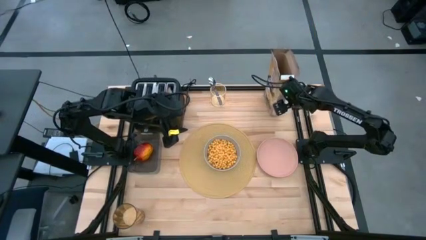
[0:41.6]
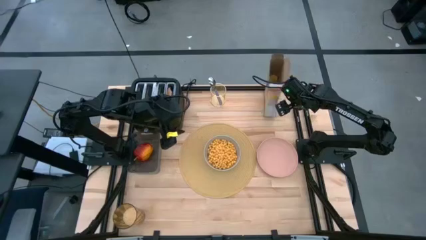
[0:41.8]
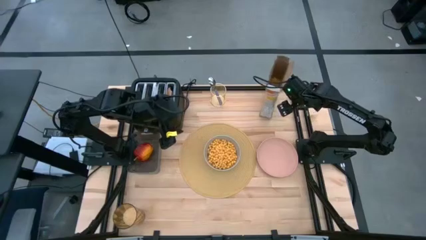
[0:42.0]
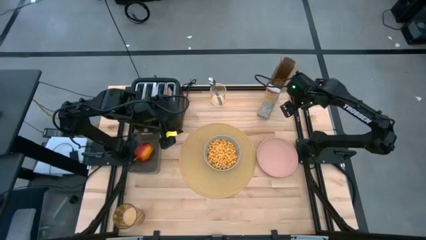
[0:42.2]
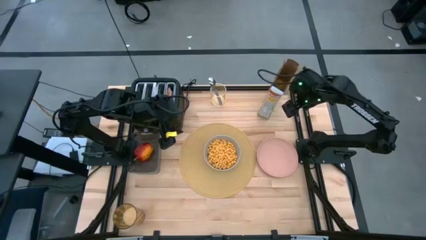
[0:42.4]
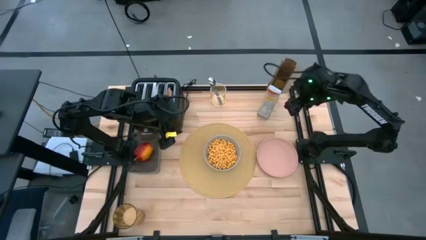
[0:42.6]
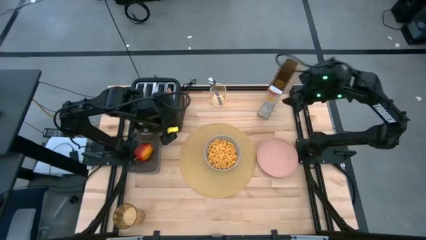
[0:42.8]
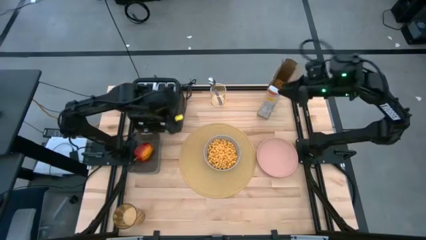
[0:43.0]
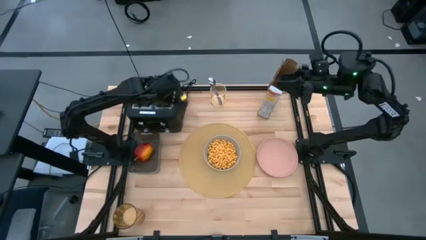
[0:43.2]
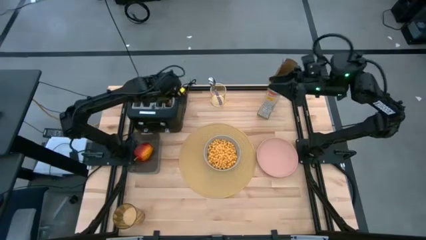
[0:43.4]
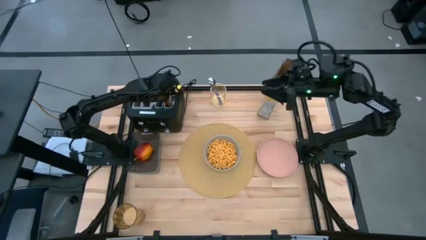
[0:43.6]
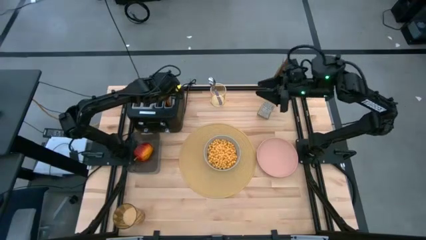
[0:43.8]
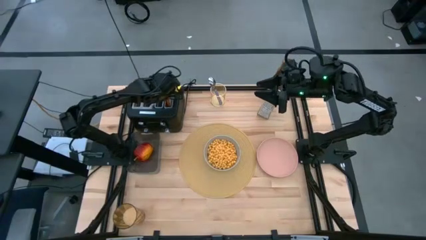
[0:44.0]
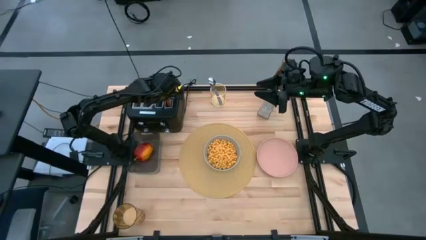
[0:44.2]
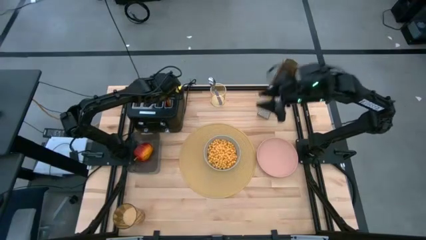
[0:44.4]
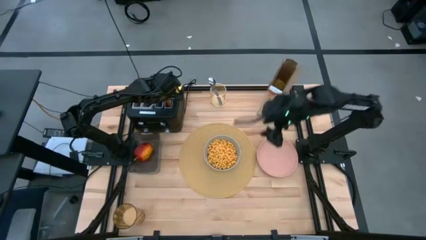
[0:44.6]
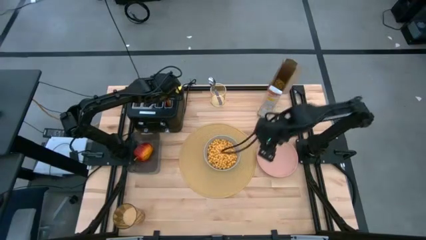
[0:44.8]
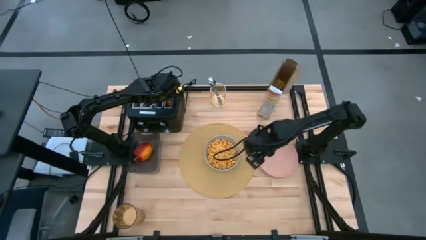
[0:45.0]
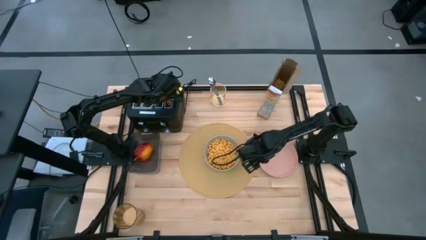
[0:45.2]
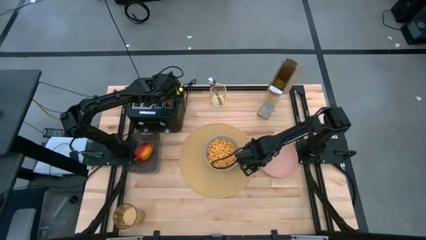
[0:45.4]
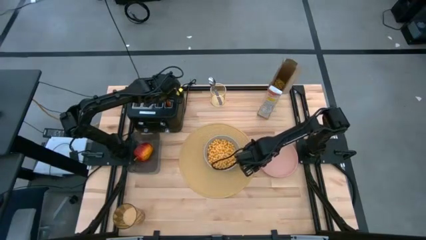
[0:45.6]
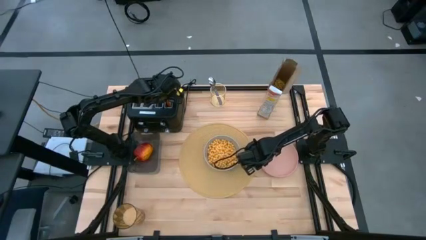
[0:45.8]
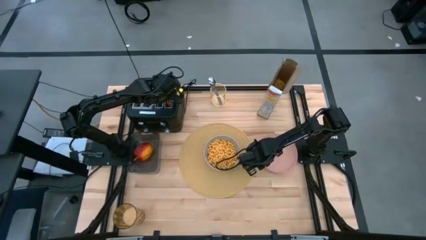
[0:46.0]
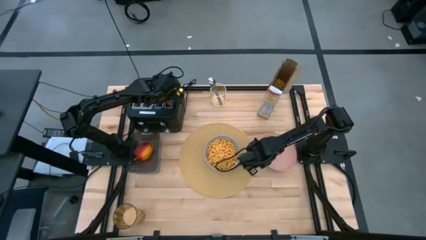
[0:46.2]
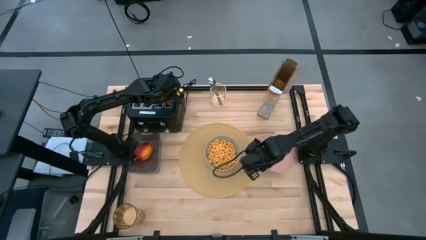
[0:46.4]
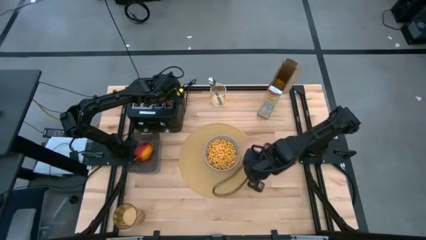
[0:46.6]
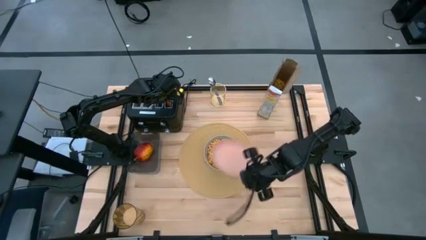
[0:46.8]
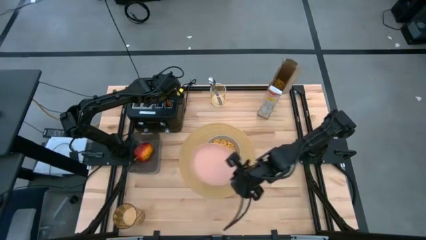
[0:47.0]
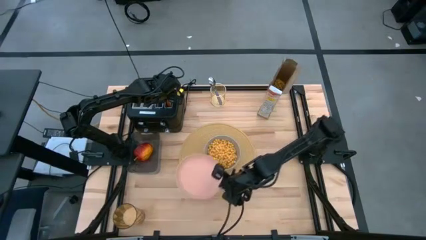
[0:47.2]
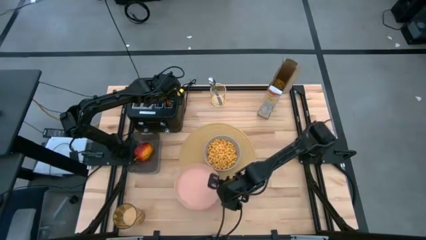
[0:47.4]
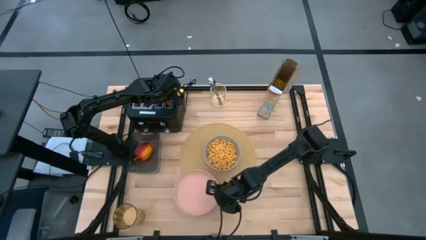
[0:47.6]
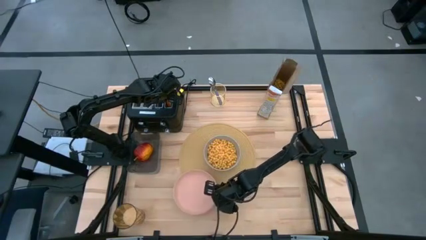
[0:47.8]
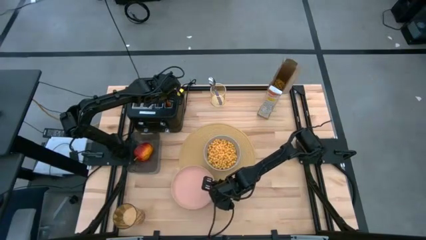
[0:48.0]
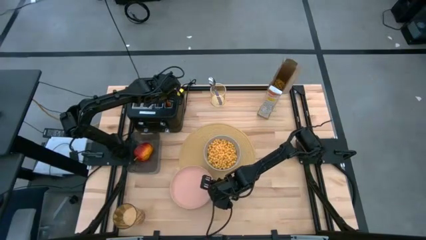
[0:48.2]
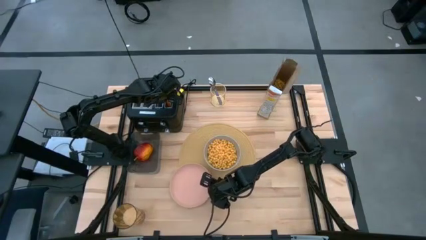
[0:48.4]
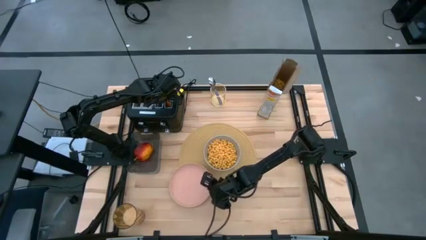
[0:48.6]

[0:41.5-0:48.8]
Task: Arrange a breakfast setting
Put the pink plate on the table mat to the bottom left of the gray bowl

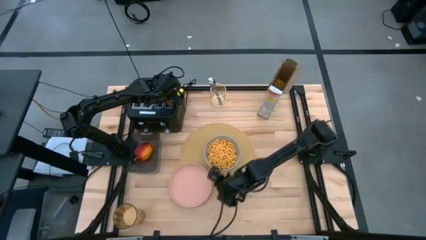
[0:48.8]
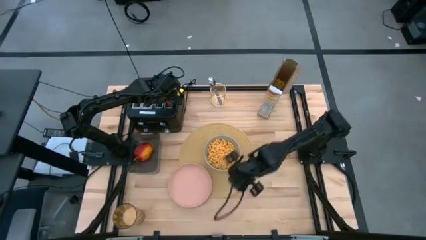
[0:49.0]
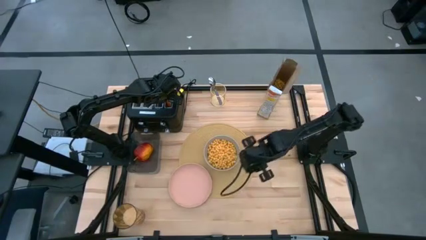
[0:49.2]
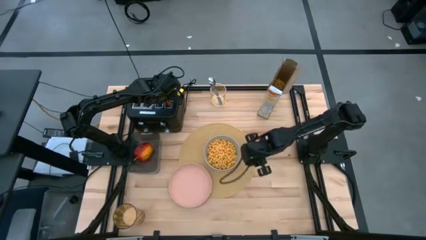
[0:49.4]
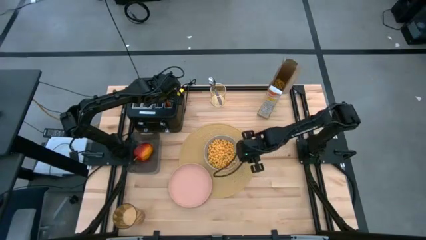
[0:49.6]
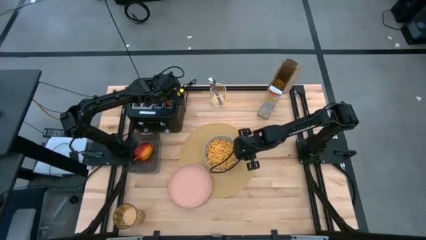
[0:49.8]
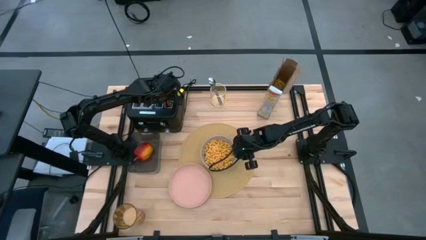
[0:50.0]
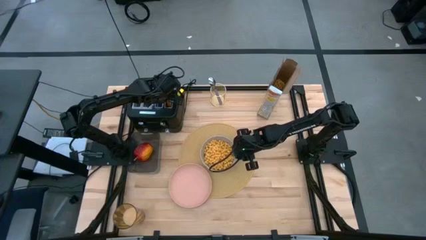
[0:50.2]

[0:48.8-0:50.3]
Adjust the gray bowl

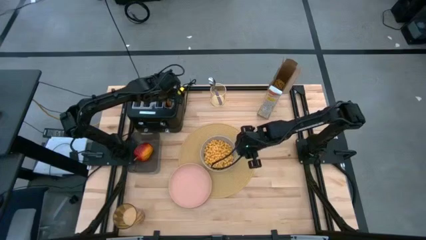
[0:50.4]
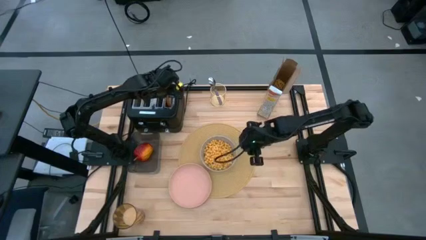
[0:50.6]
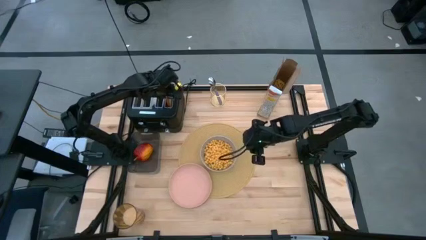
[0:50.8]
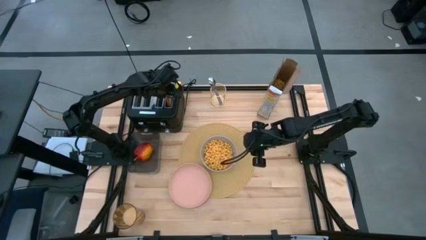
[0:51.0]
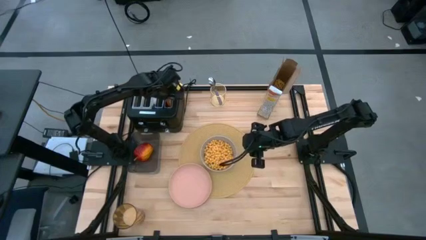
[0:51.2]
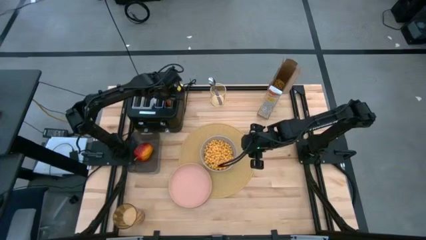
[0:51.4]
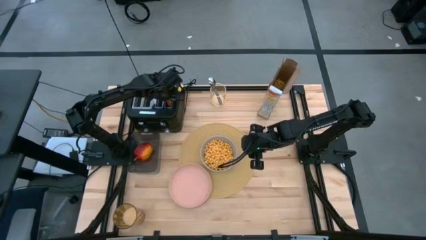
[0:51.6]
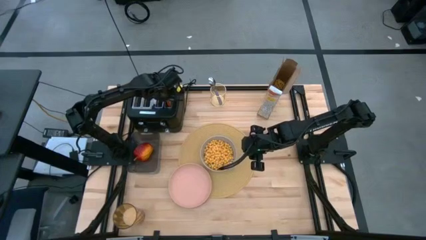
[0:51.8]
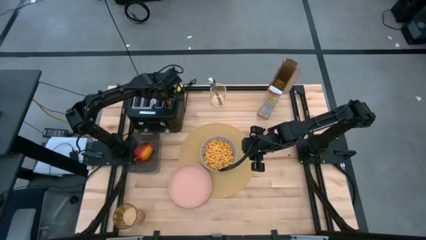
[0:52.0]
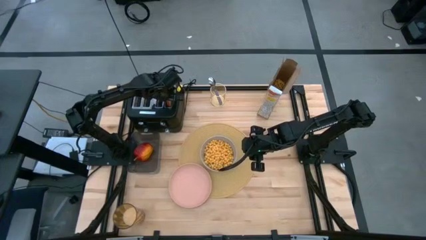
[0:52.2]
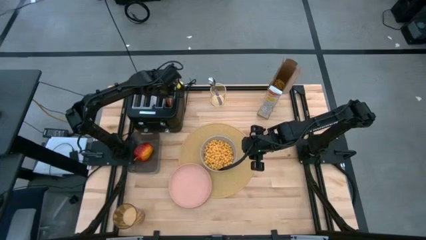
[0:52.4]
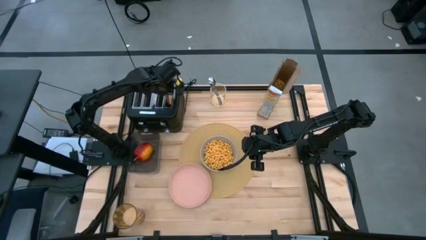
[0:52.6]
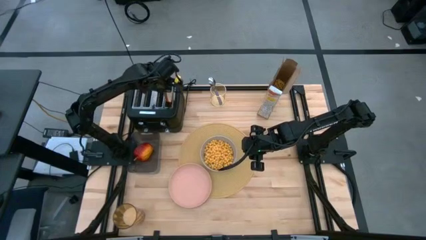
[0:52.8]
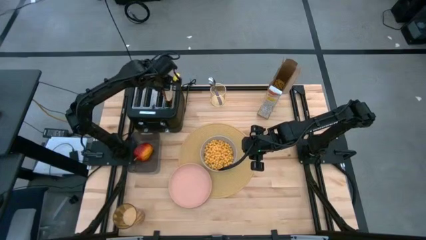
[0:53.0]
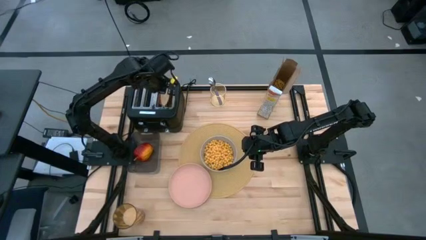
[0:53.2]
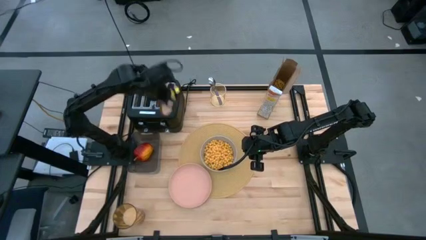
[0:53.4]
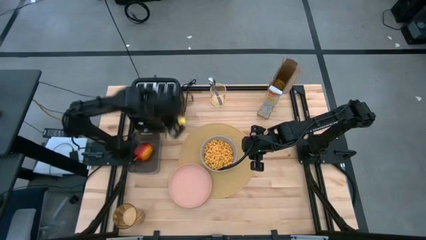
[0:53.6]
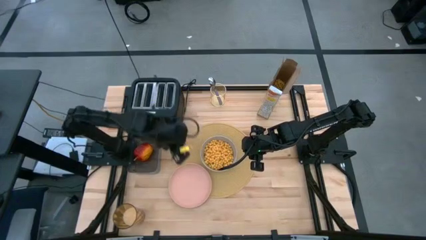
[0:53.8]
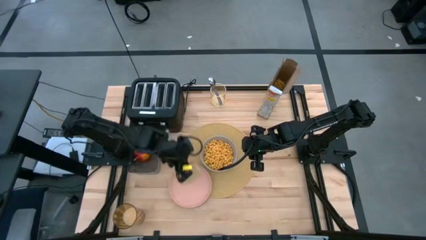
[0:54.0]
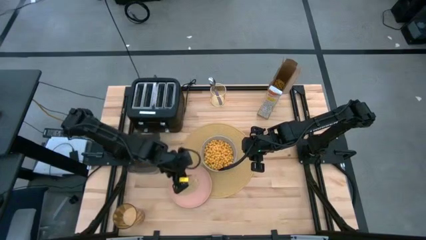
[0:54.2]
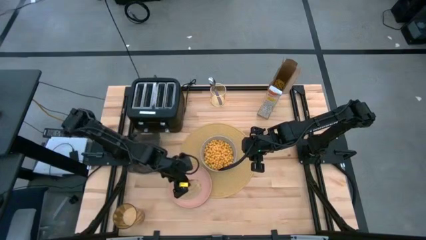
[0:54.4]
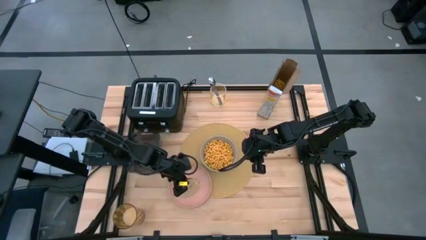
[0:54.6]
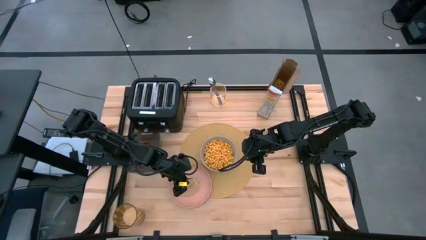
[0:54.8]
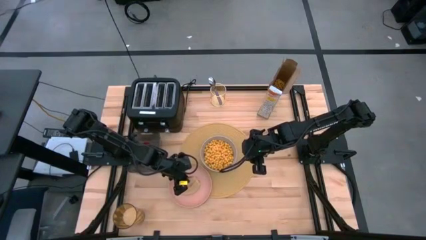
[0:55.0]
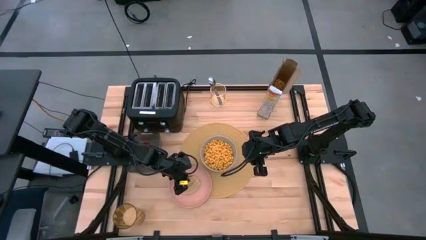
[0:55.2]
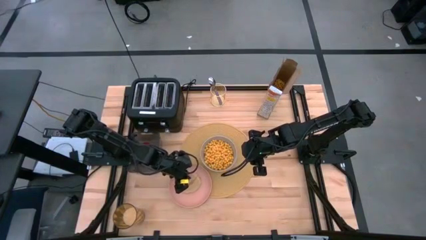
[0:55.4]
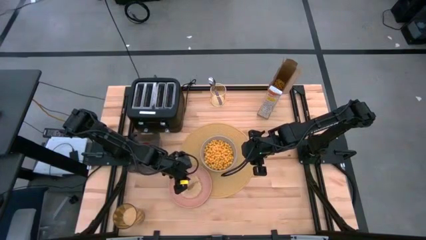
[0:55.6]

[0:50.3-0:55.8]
Put the bagel on the pink plate

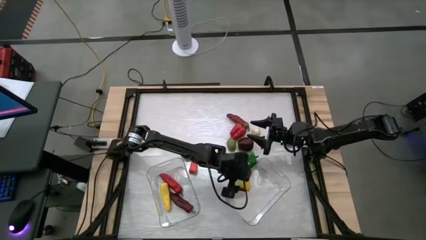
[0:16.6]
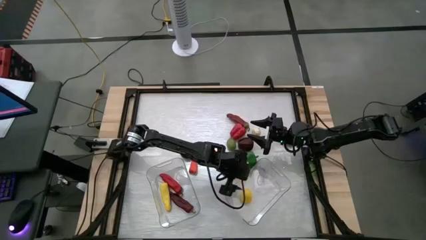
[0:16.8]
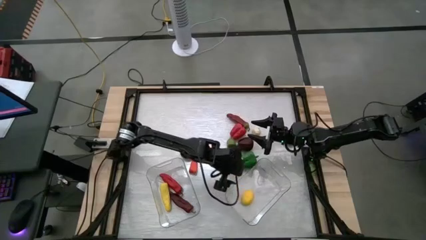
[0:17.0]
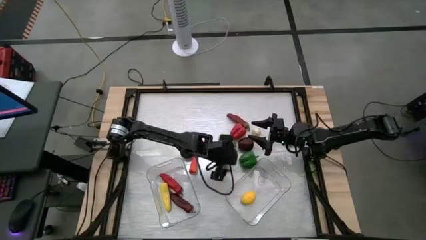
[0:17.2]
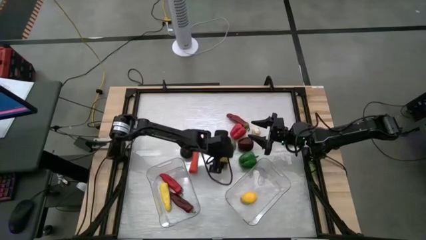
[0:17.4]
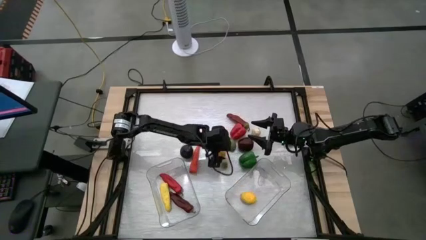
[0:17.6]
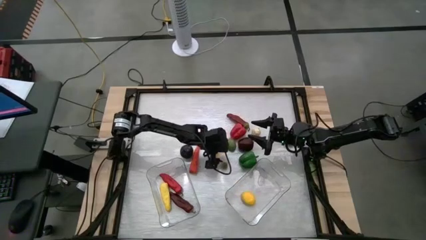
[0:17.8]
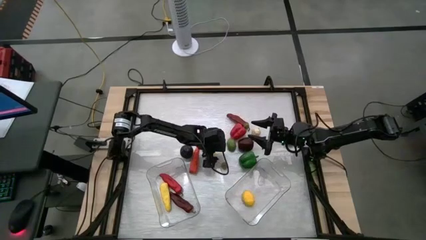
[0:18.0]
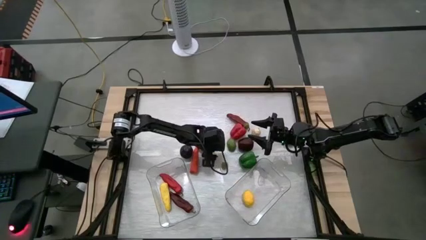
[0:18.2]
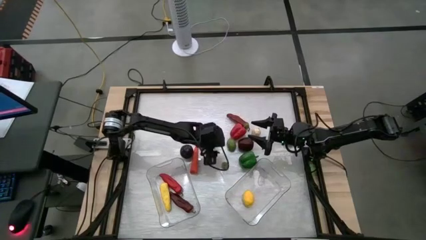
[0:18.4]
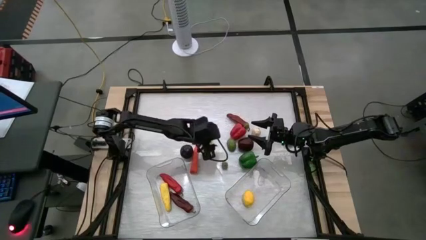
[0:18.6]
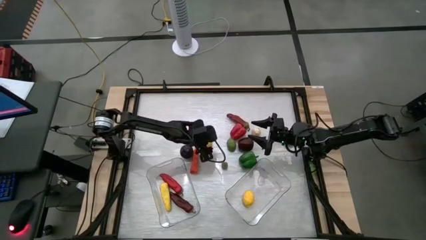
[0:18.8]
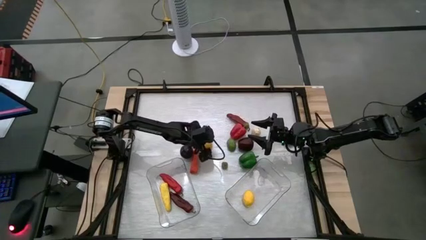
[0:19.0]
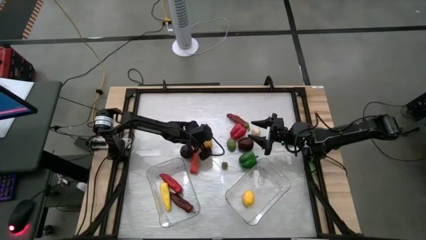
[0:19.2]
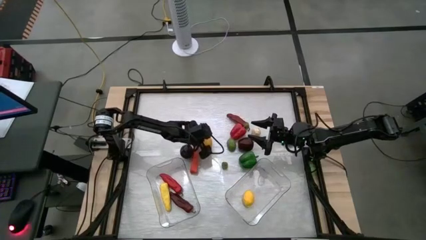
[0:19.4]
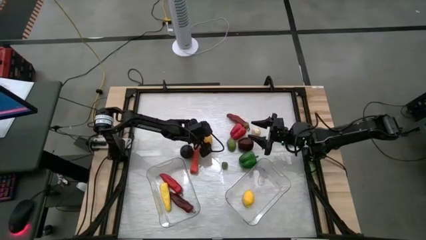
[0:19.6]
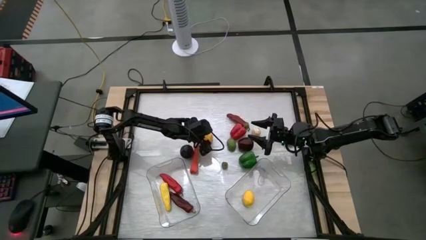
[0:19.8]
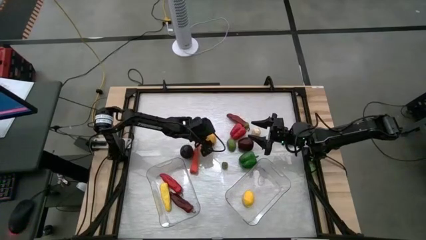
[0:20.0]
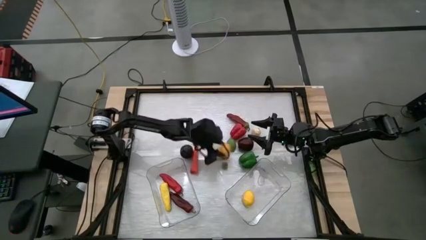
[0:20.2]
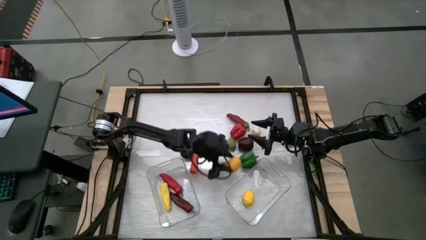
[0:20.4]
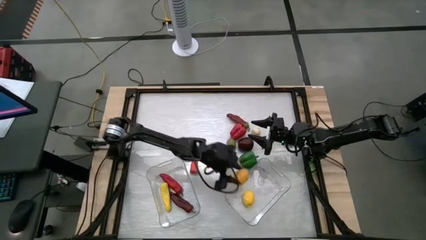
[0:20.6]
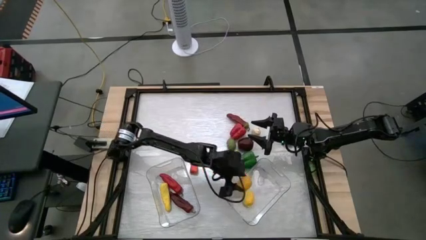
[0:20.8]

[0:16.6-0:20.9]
Task: Sort produce into baskets
Put the lemon into the right transparent bin
